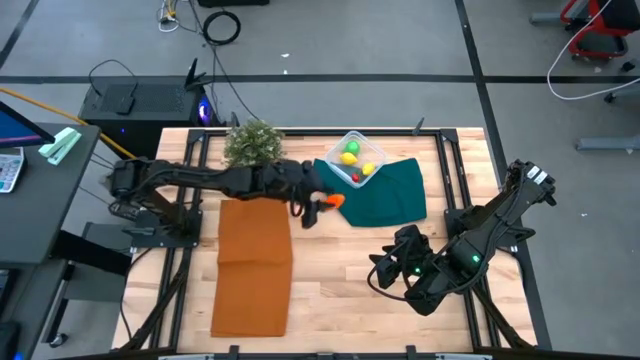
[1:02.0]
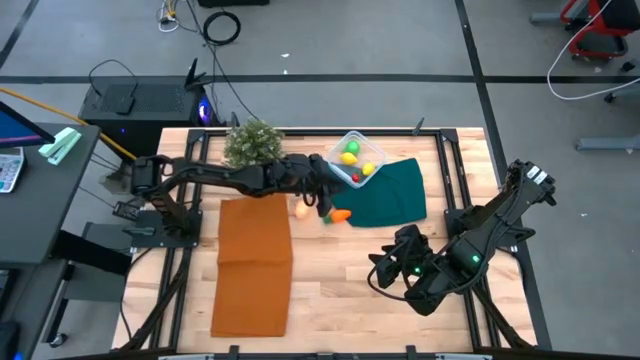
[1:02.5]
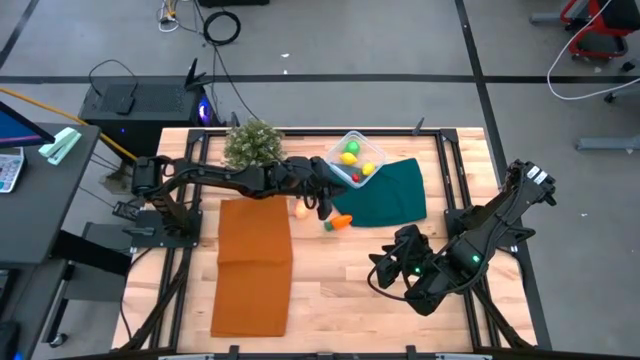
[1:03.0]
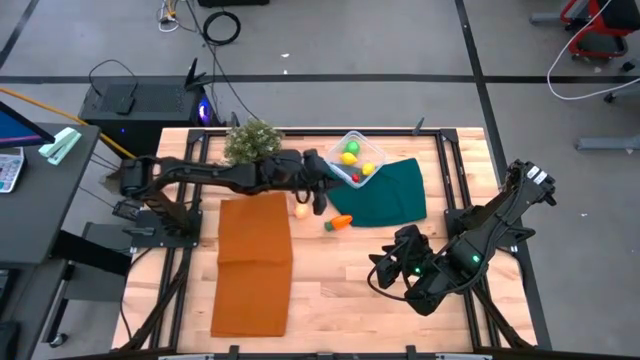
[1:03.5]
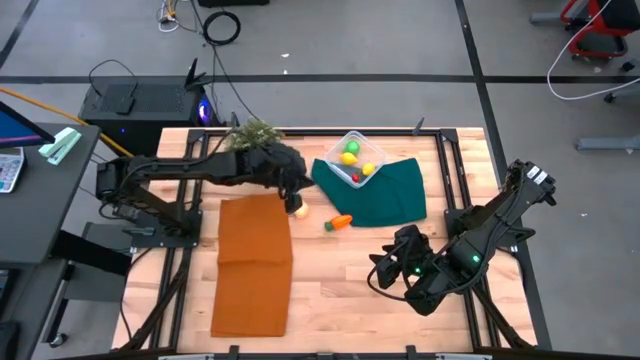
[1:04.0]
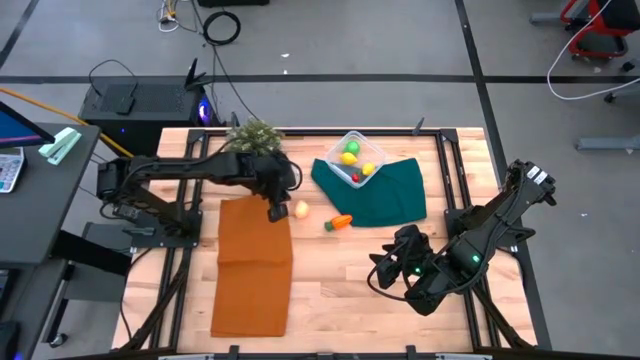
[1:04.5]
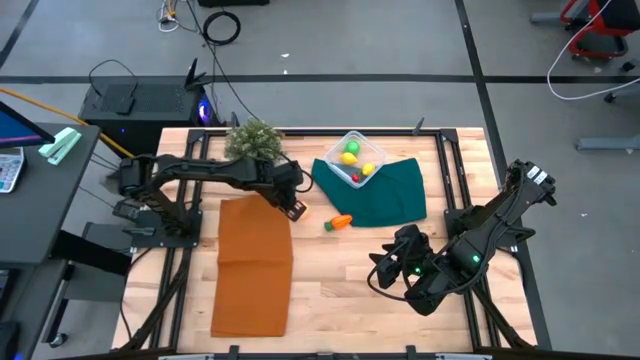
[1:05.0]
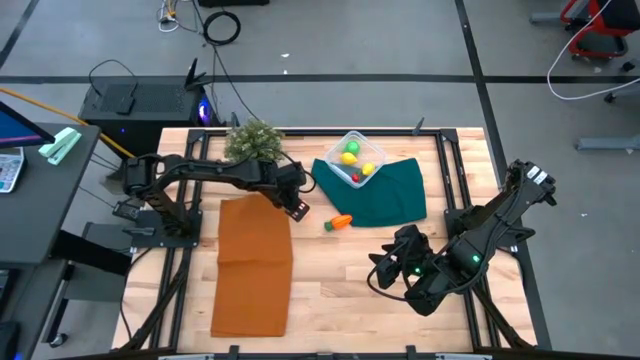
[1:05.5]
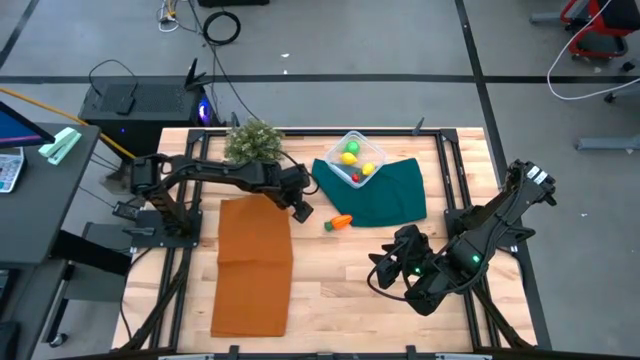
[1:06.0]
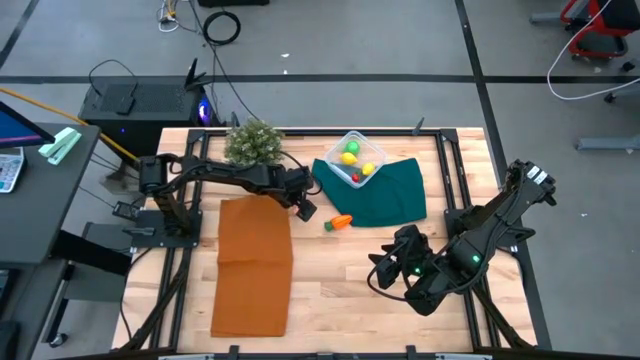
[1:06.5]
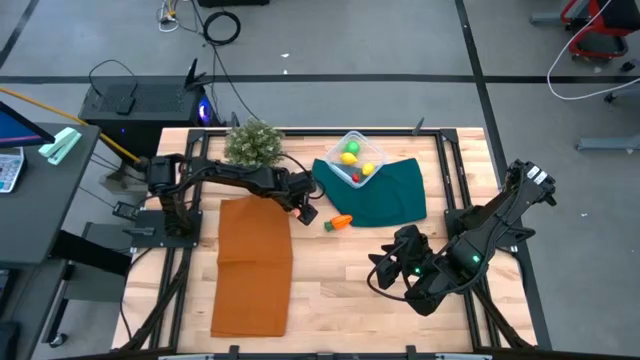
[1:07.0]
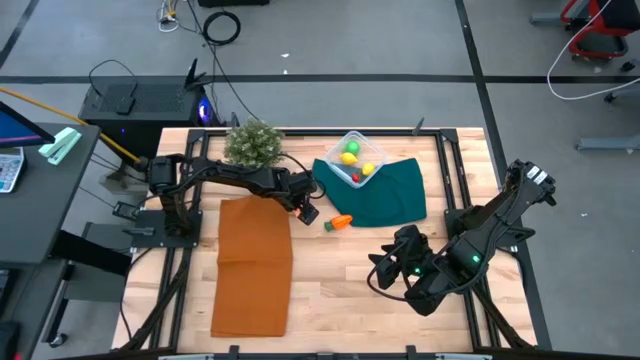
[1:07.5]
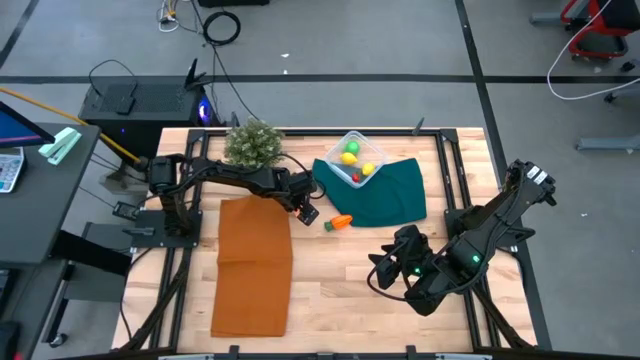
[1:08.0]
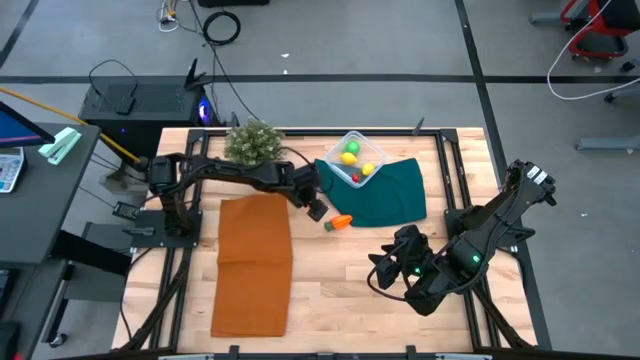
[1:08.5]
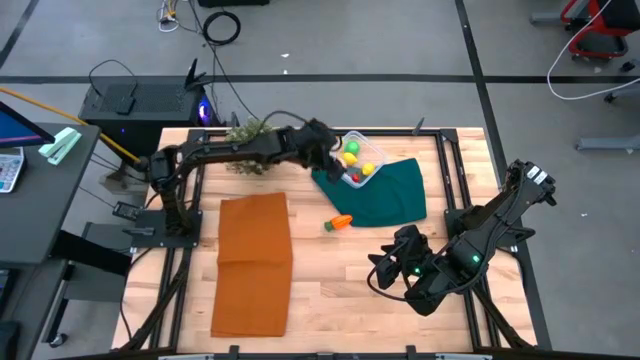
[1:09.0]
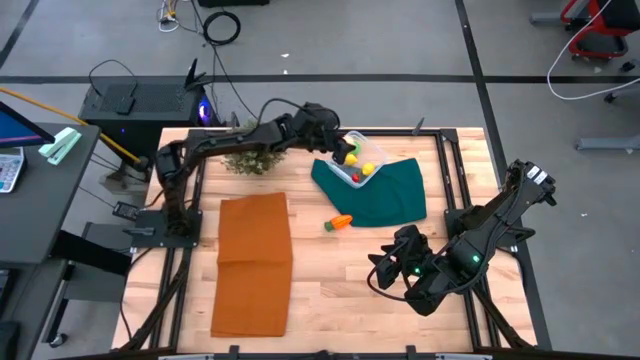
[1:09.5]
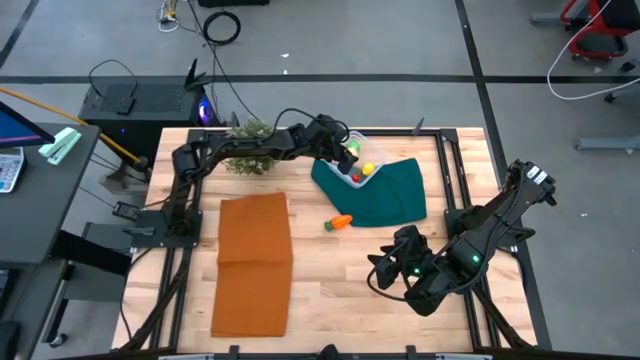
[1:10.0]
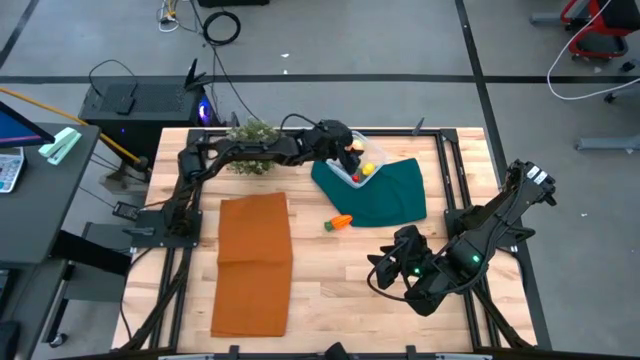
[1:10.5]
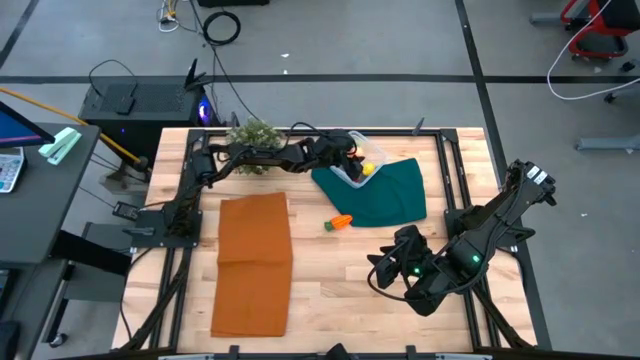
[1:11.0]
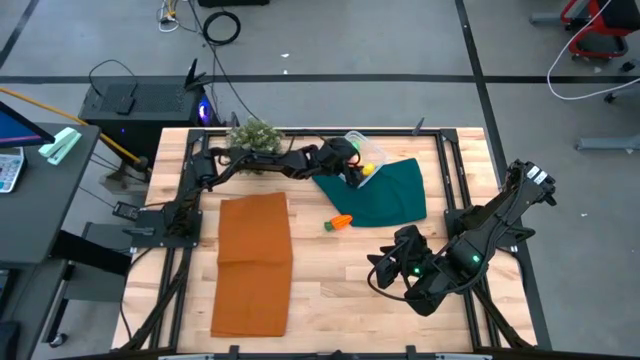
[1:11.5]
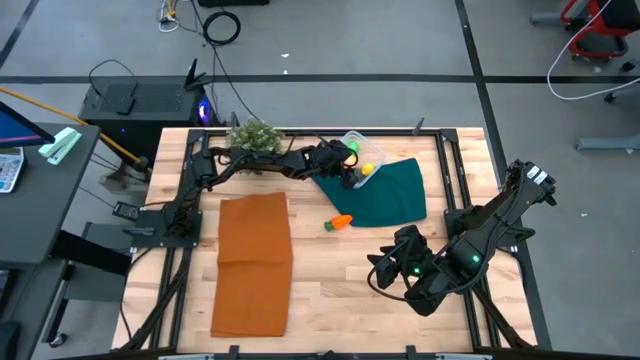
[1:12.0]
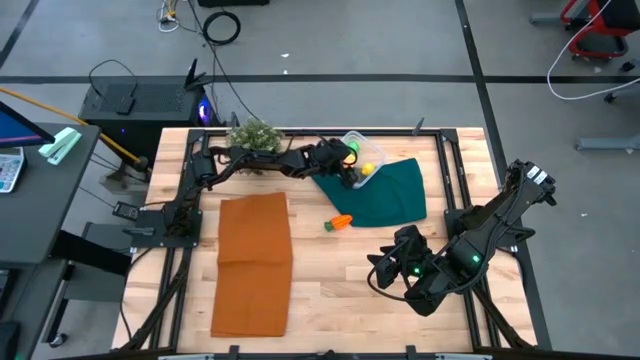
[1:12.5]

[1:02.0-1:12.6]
Task: Pick and placing Produce into tupperware
Put the peach into the transparent bin

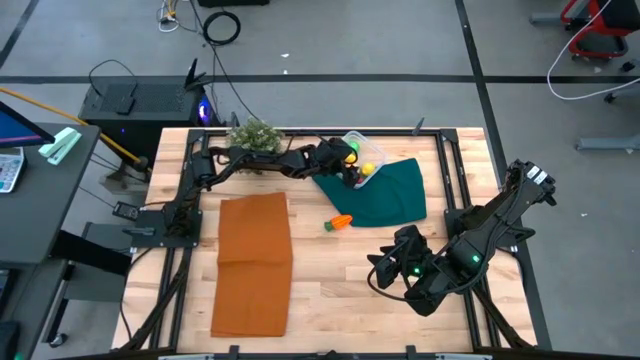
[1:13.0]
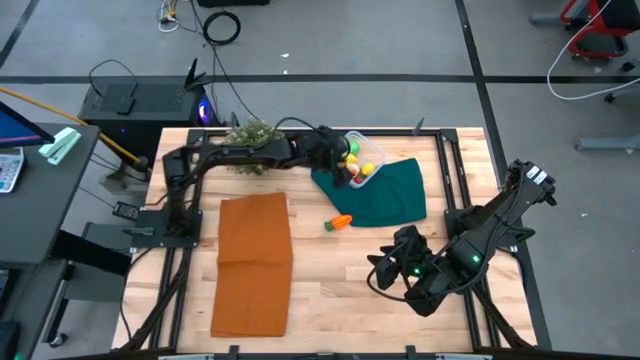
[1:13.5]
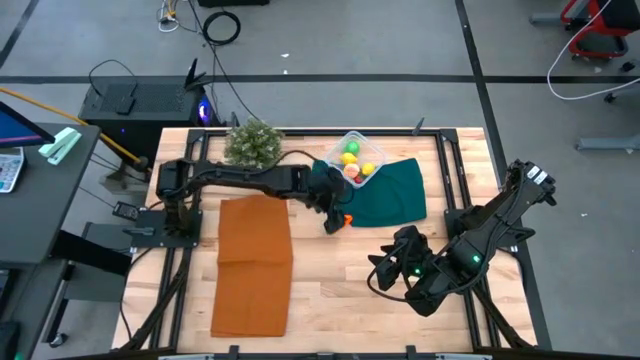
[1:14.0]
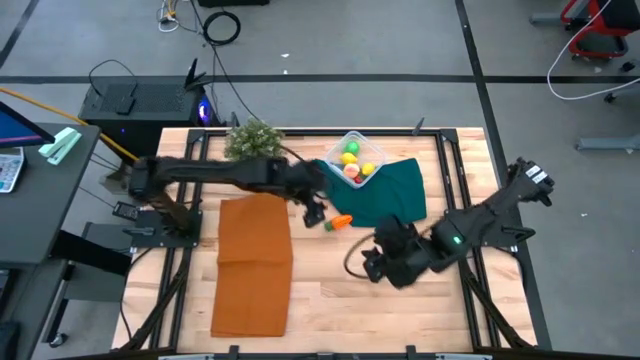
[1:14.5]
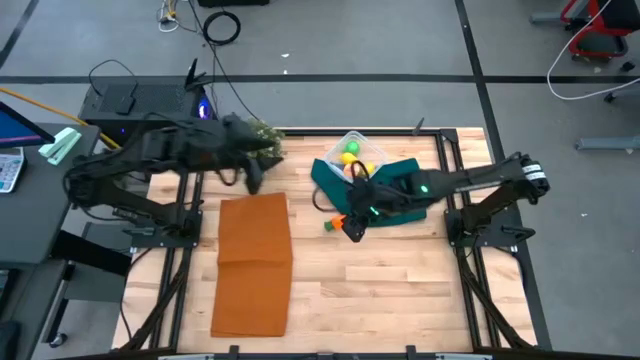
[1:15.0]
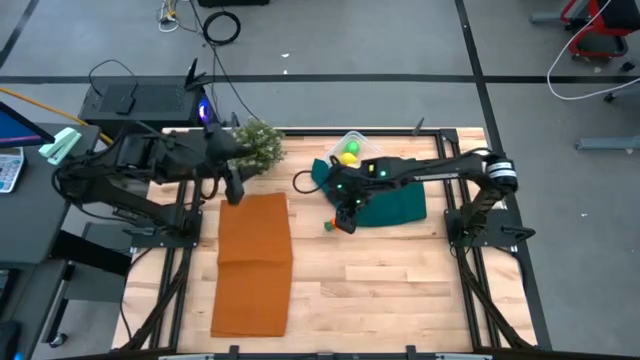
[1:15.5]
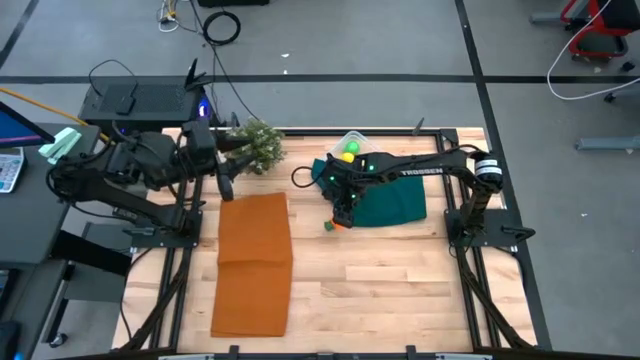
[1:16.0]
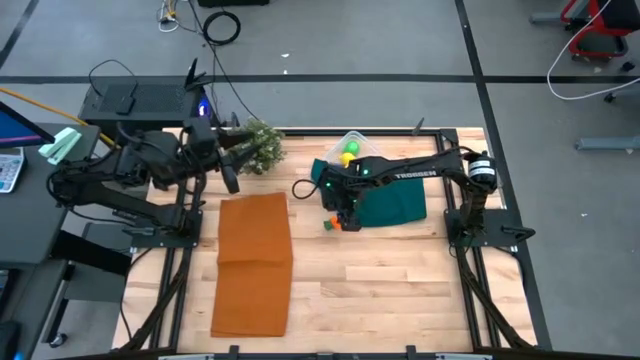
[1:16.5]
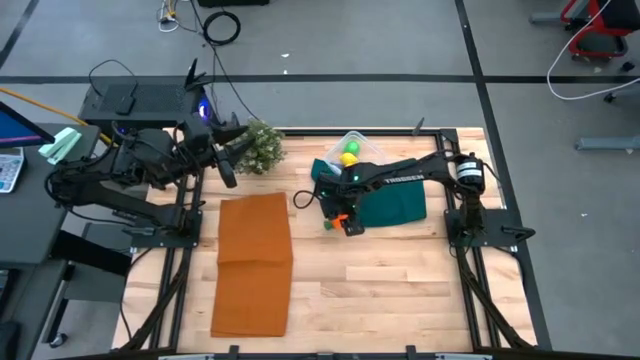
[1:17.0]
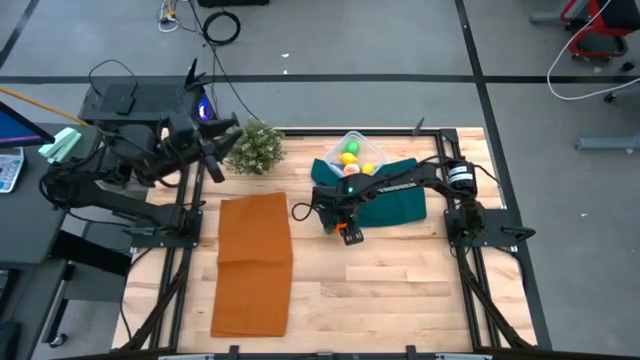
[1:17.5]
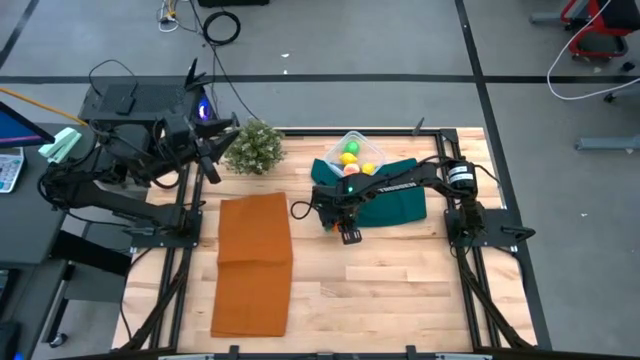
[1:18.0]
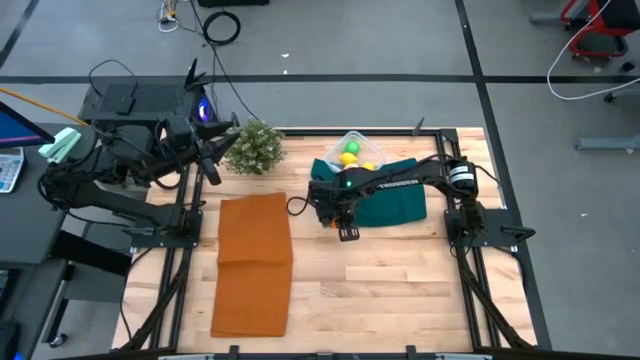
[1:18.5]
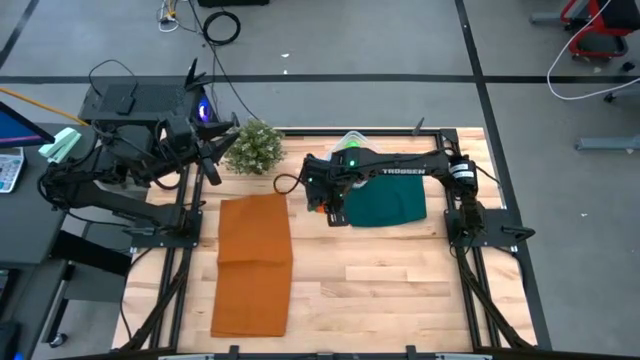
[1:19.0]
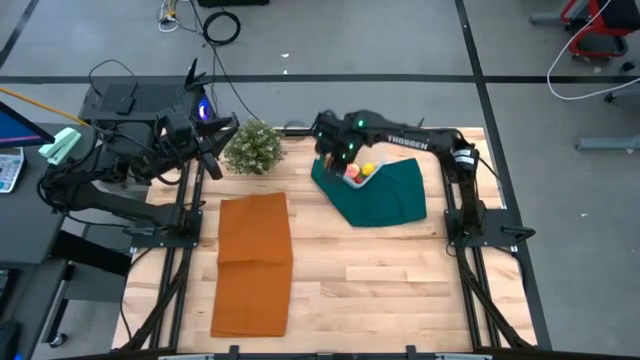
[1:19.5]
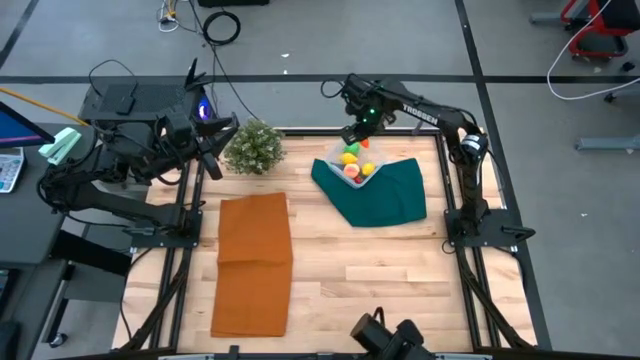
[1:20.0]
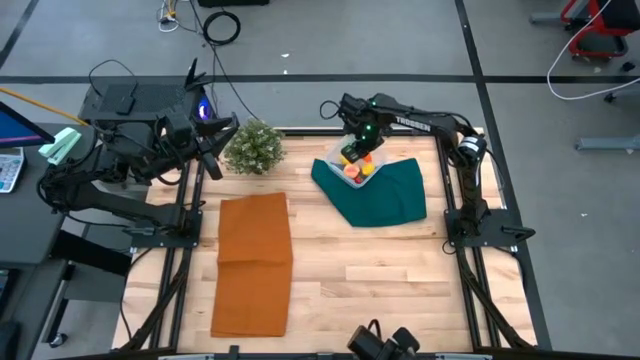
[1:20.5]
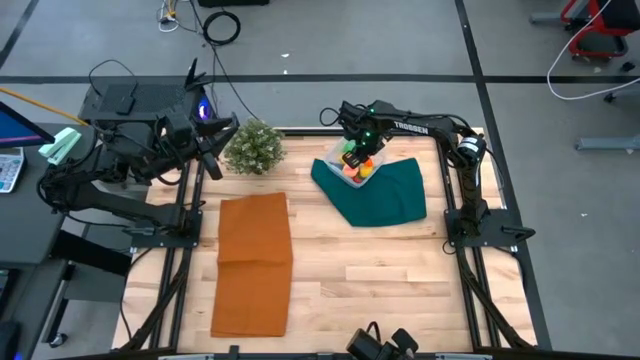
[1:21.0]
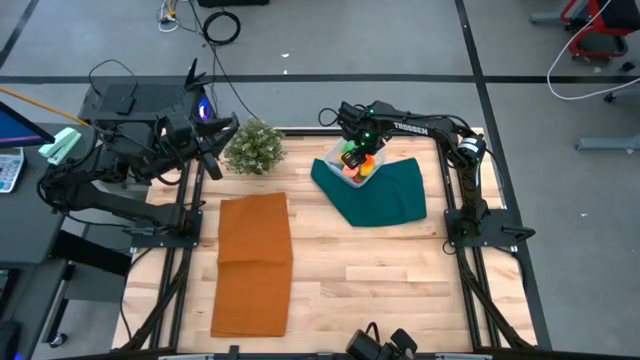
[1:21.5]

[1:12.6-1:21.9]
Put the carrot into the transparent bin

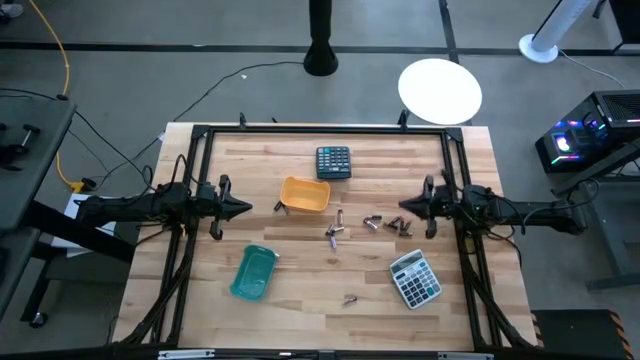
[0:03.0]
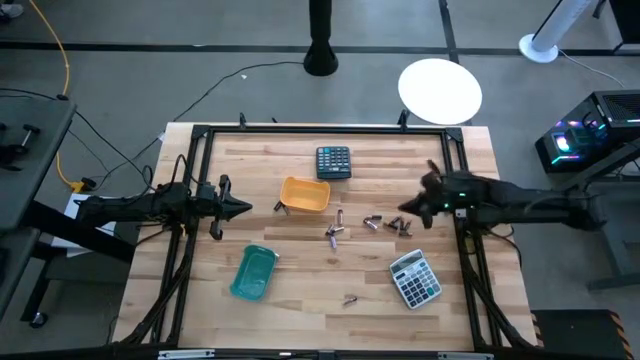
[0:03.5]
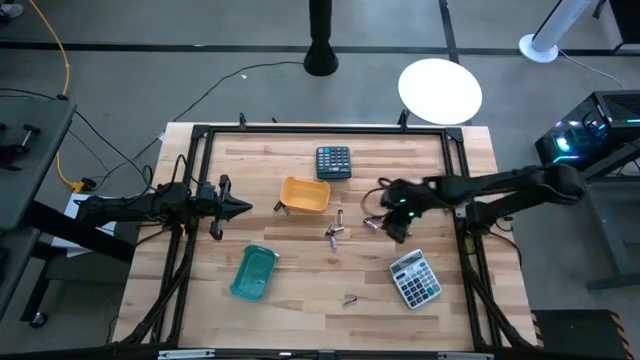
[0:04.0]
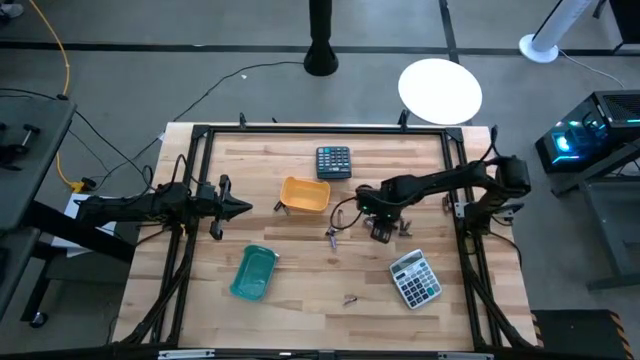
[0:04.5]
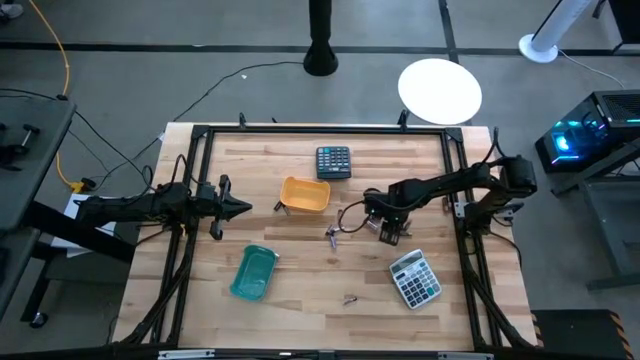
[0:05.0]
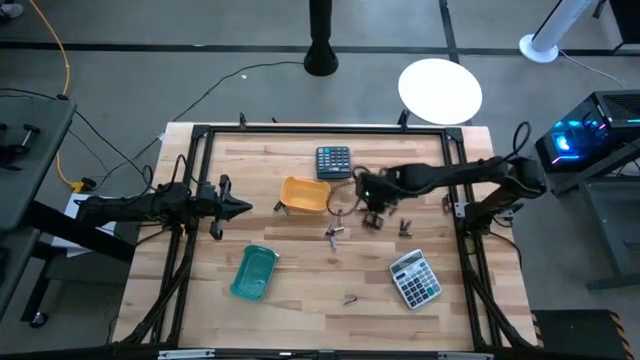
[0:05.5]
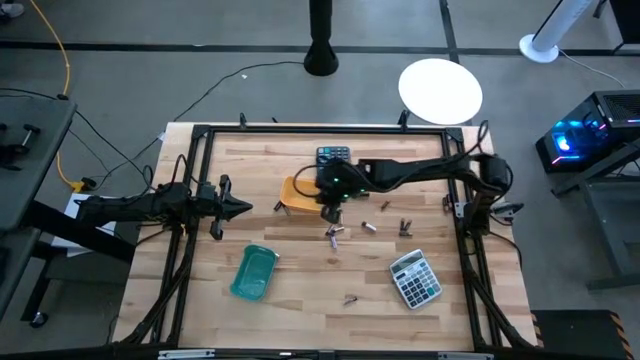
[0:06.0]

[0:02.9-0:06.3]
Task: Sort batteries
Put the black battery into the yellow bin
